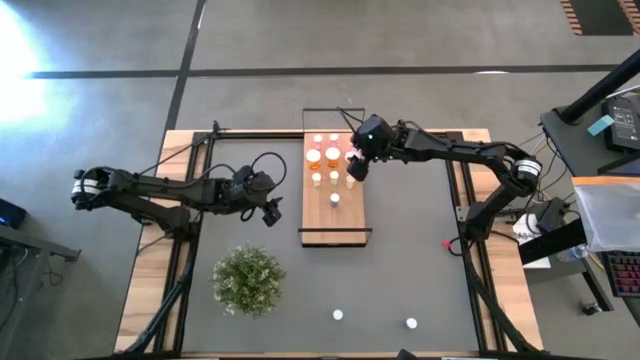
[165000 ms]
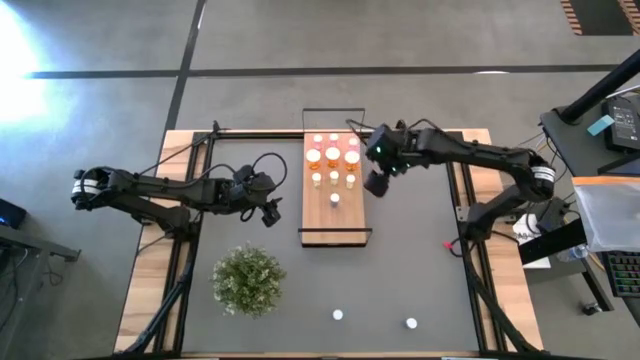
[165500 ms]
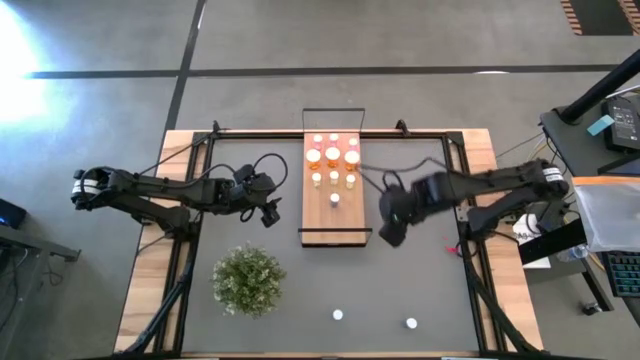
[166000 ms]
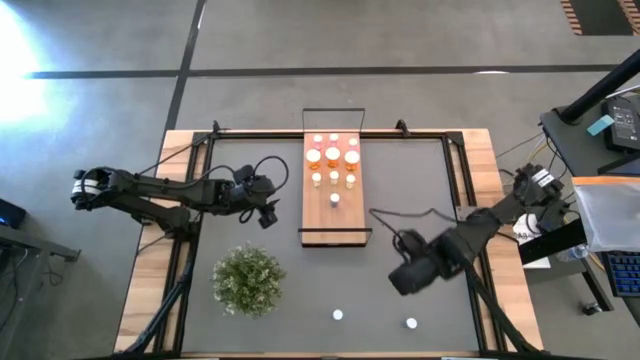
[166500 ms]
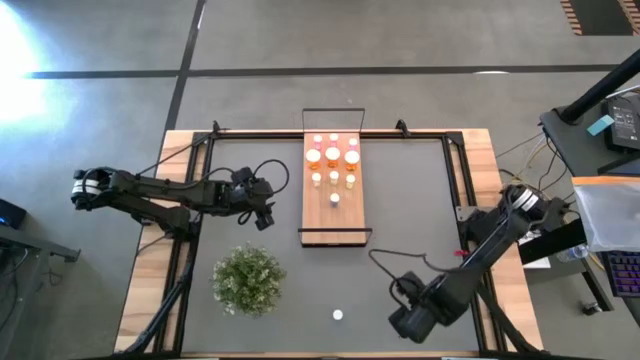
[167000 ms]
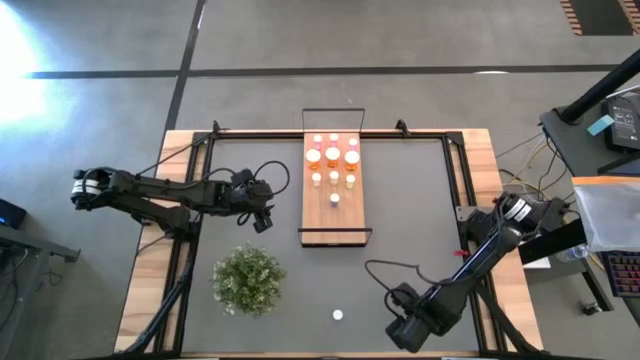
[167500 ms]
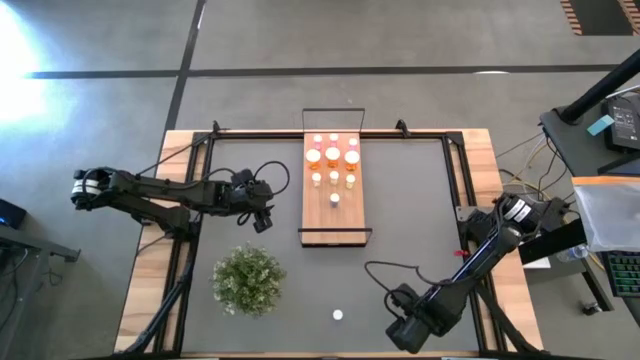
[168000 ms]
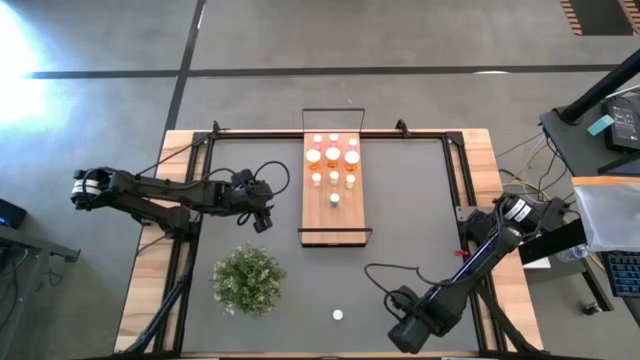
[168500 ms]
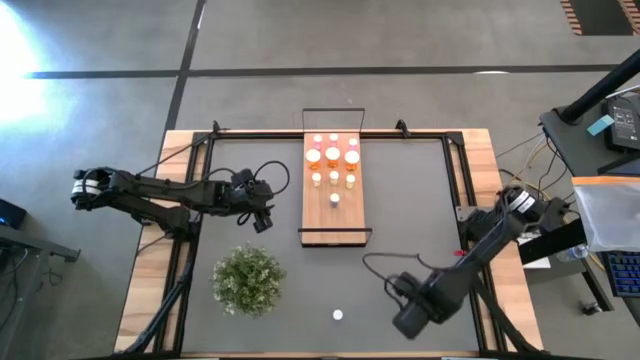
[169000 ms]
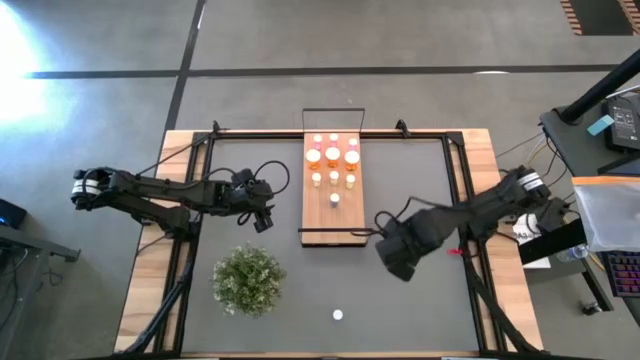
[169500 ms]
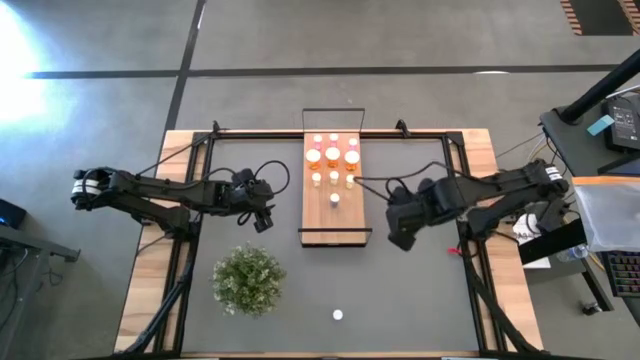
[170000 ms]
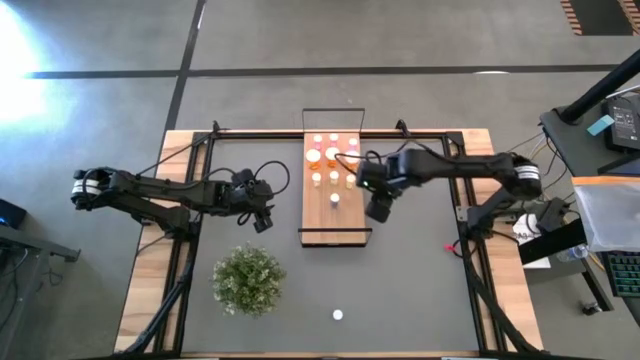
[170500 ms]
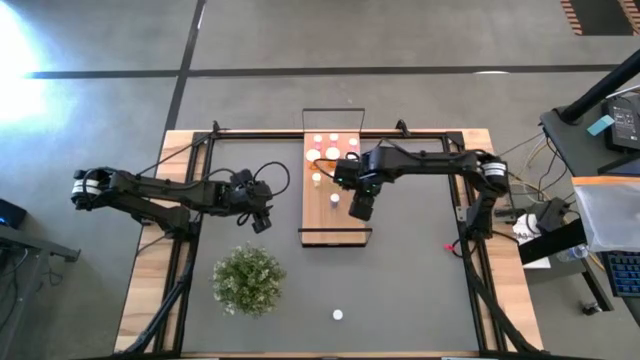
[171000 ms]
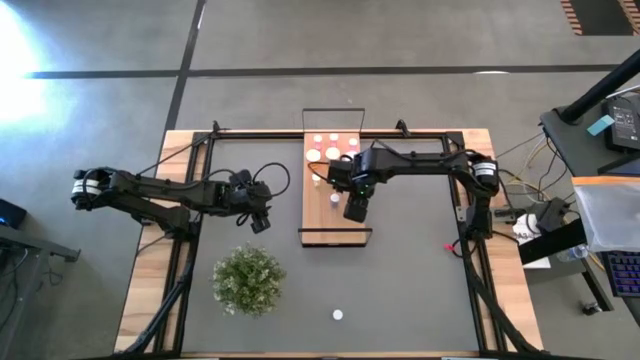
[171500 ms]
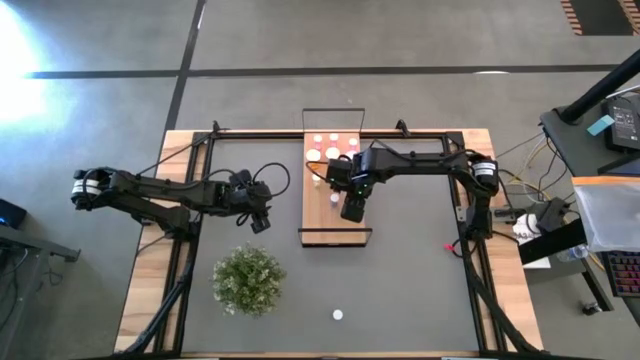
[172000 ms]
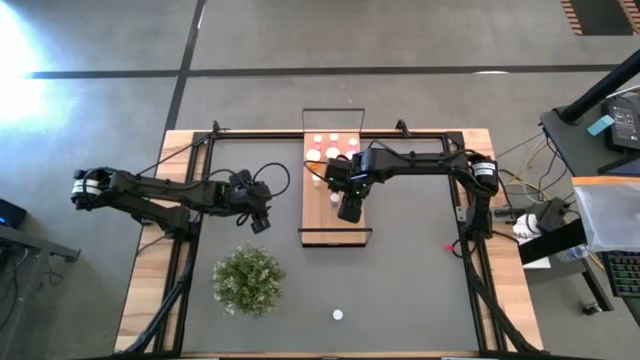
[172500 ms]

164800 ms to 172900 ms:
Task: Pick and place medicine bottles onto shelf by color
Put the right blue pill bottle on the shelf aligned with the other blue pill bottle

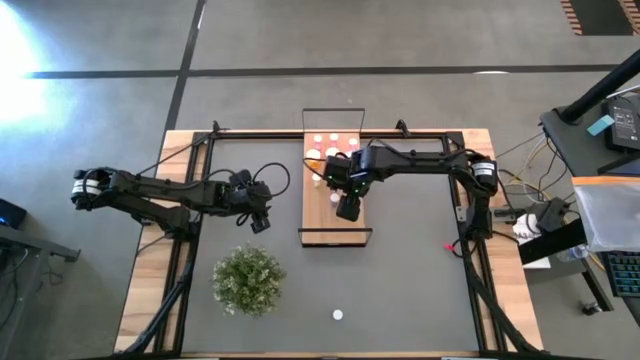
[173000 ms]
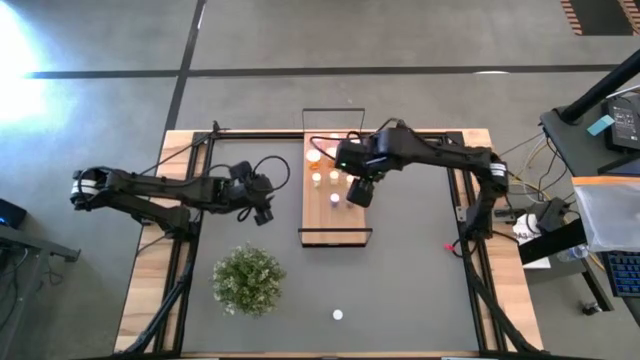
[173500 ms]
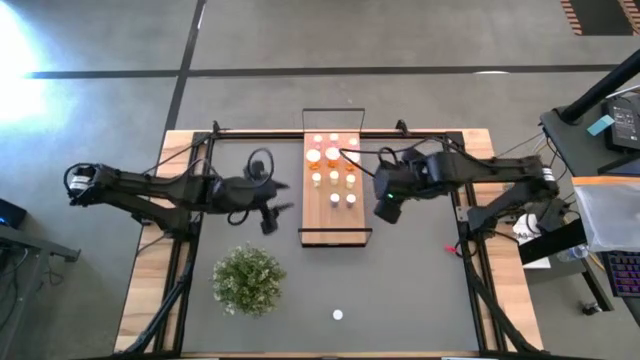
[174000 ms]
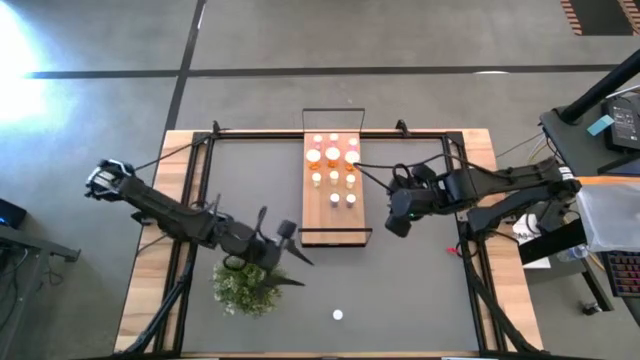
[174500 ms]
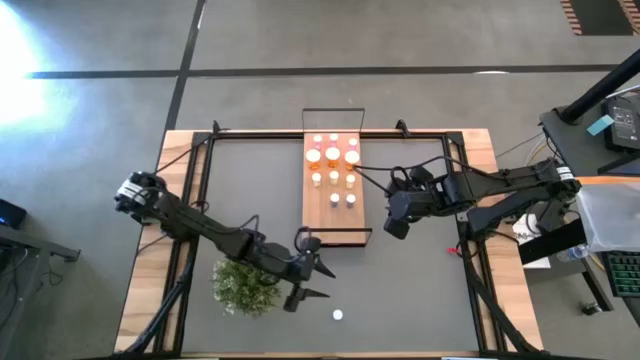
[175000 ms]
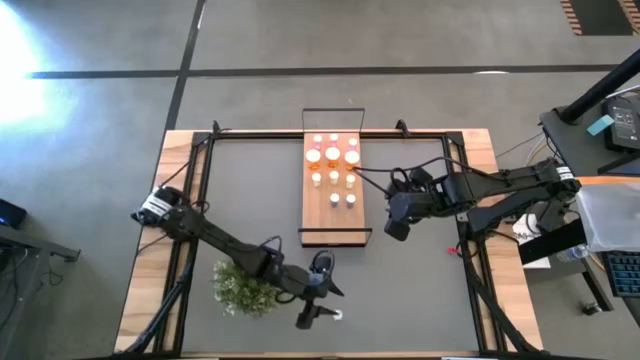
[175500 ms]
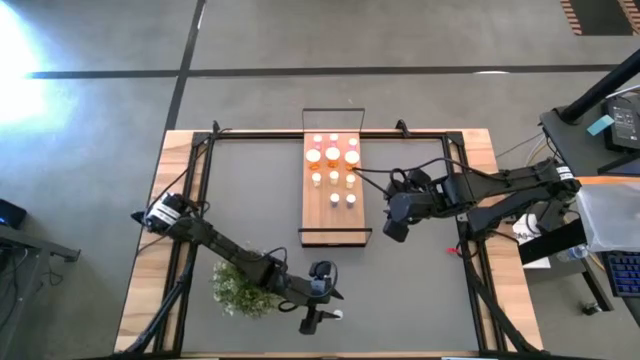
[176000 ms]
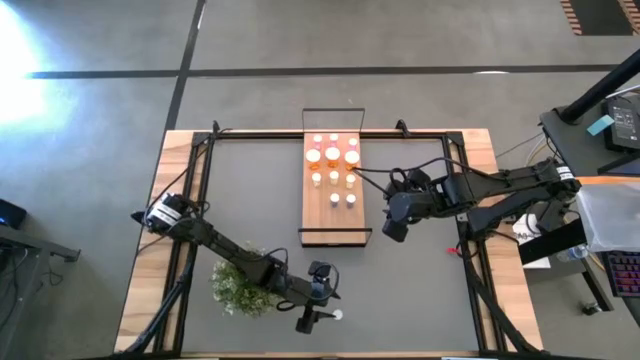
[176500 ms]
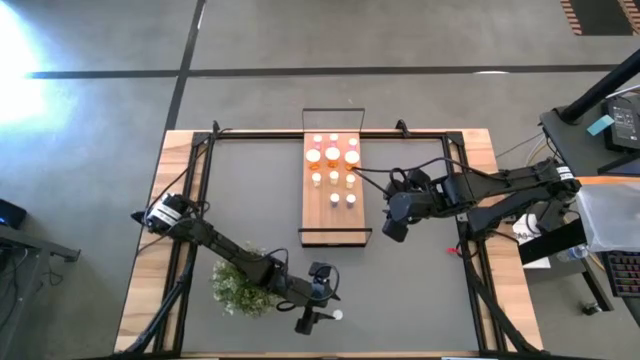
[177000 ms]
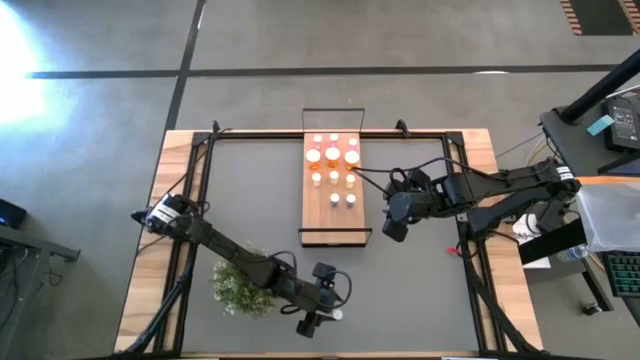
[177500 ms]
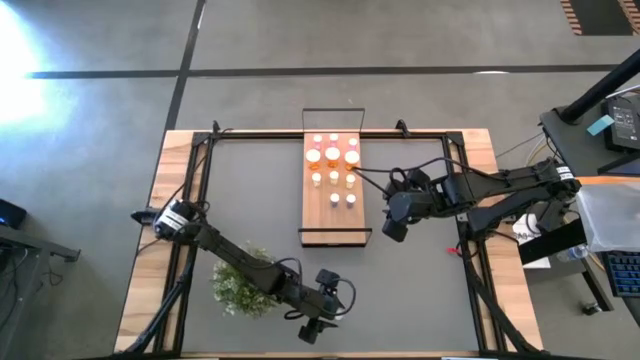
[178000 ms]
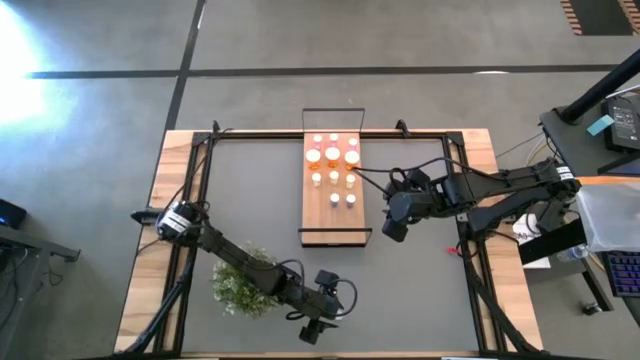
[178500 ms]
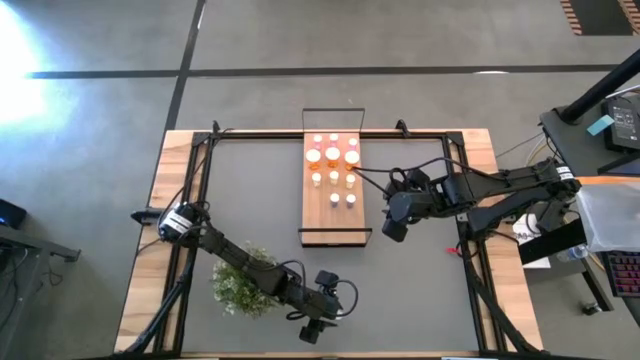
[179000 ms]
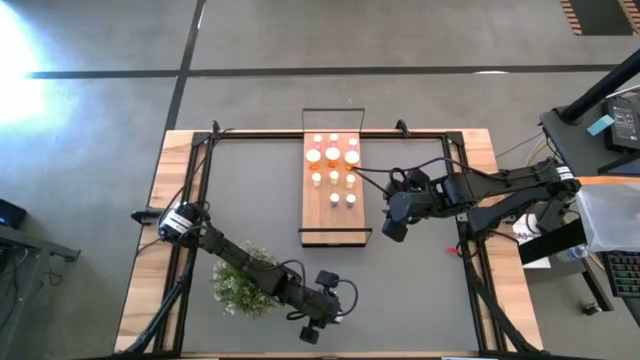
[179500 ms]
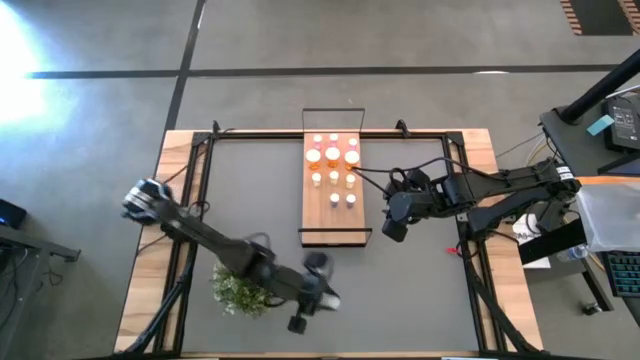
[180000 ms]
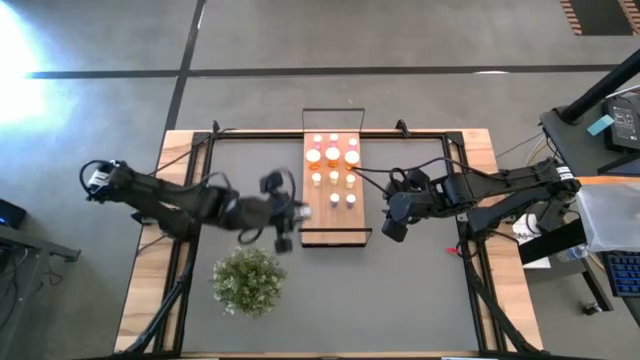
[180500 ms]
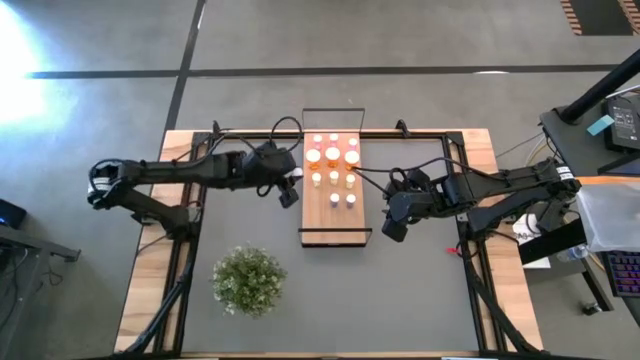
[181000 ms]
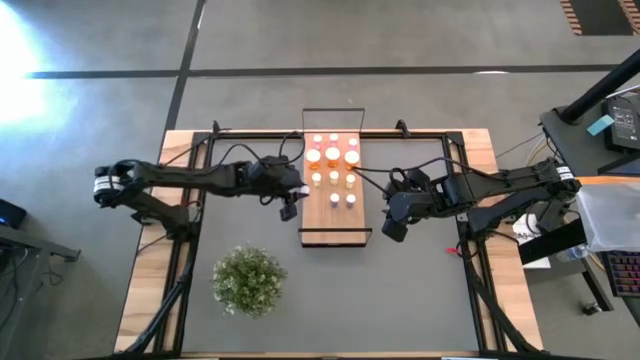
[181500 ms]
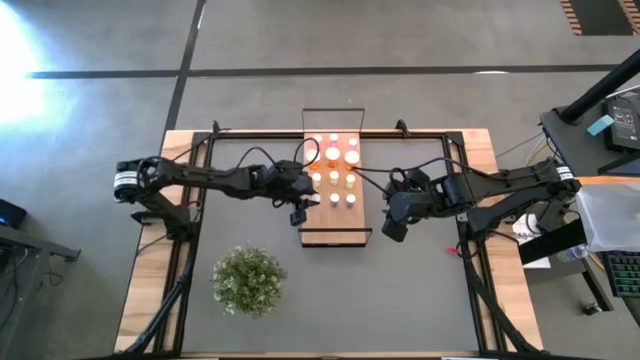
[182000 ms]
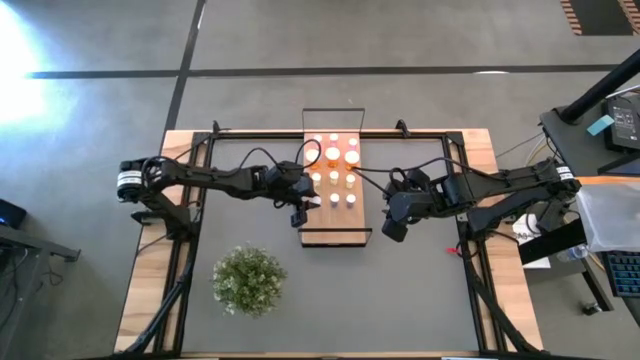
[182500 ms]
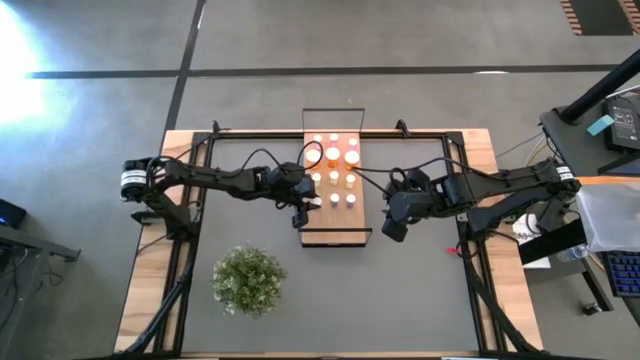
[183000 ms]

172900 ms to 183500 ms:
Put the blue pill bottle on the shelf aligned with the other blue pill bottles

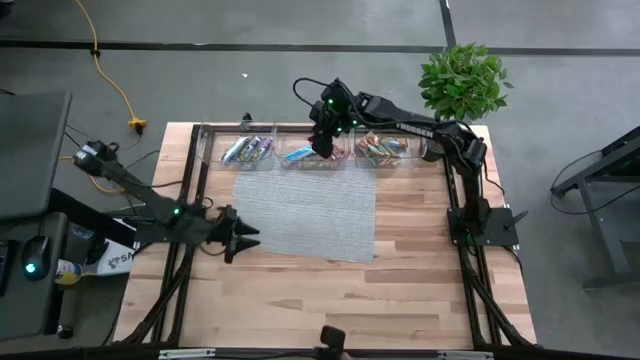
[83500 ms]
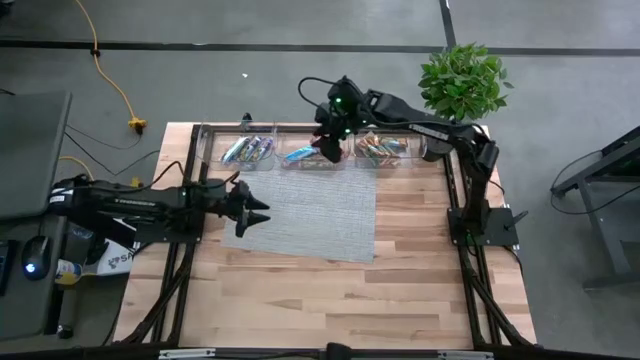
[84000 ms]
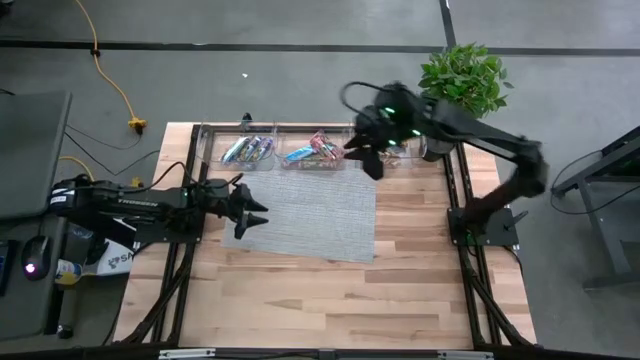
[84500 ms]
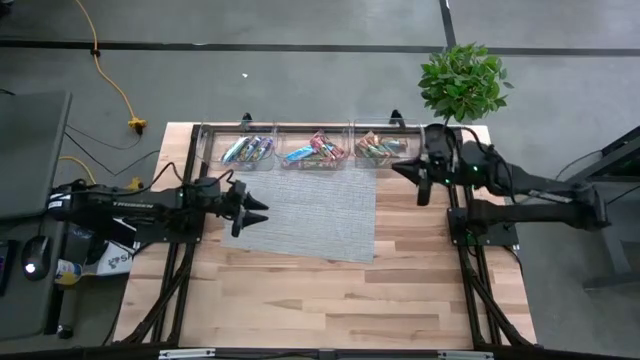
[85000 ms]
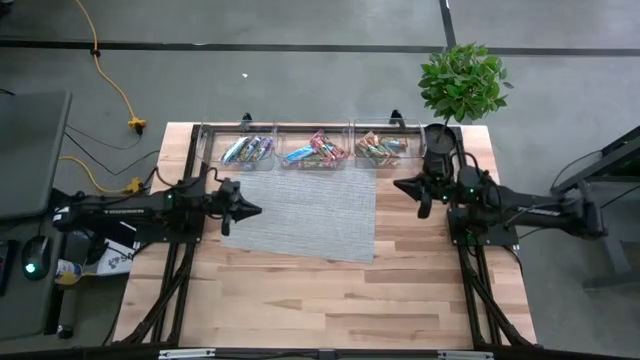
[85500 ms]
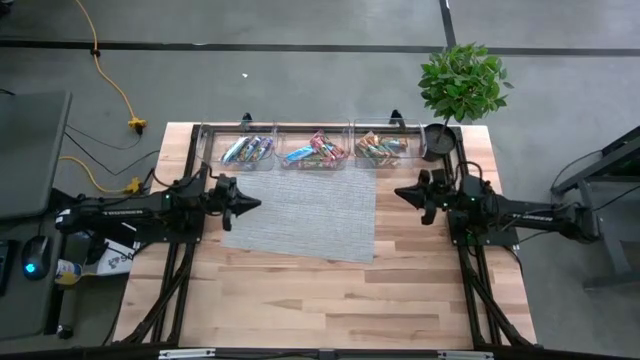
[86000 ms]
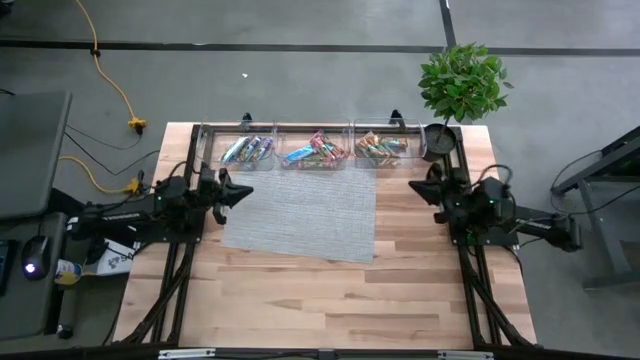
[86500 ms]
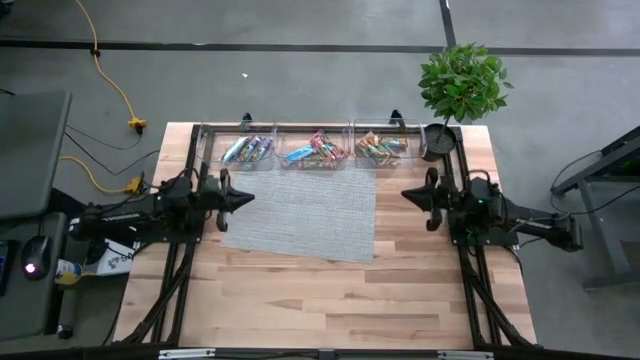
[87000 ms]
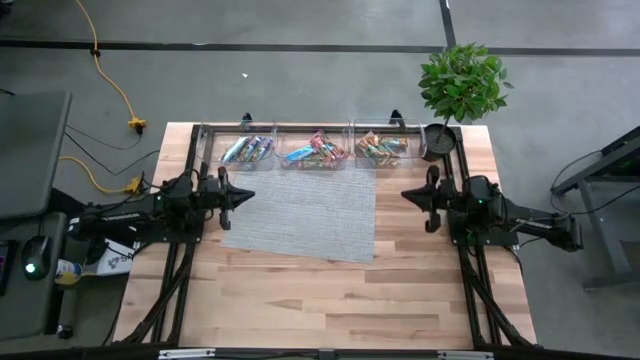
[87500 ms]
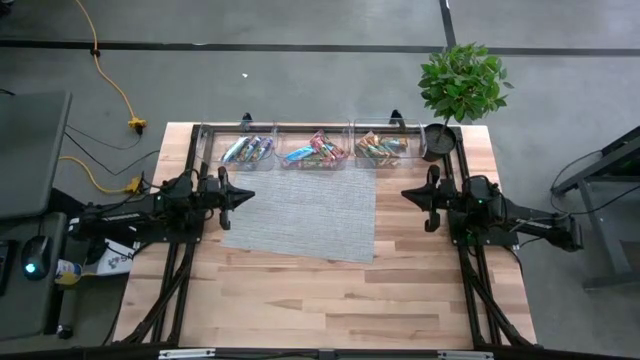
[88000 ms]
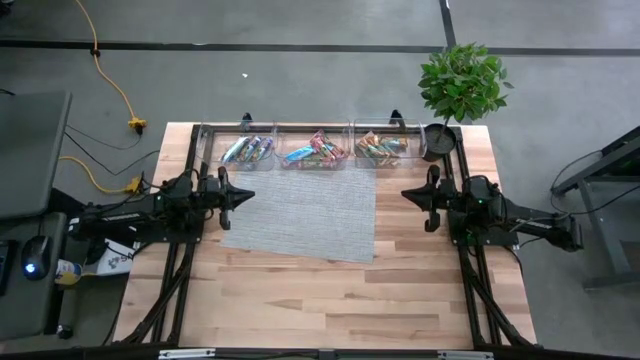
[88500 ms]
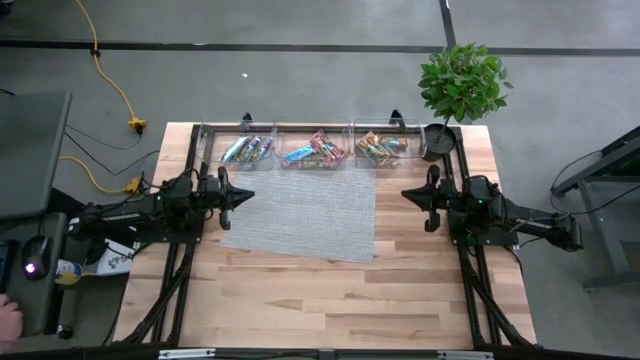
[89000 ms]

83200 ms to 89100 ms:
Task: Pick and place Granola Bars by type
Return to Home Position
